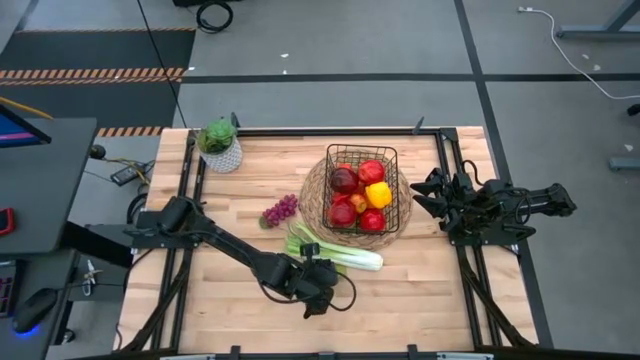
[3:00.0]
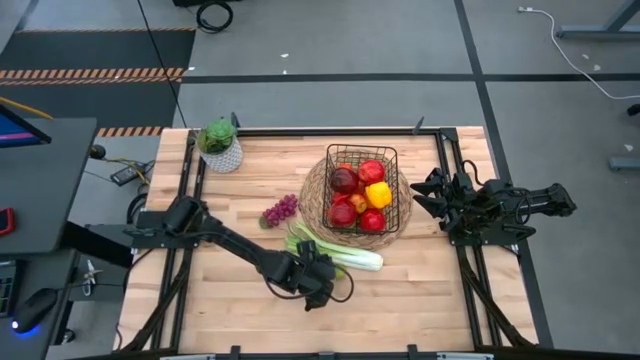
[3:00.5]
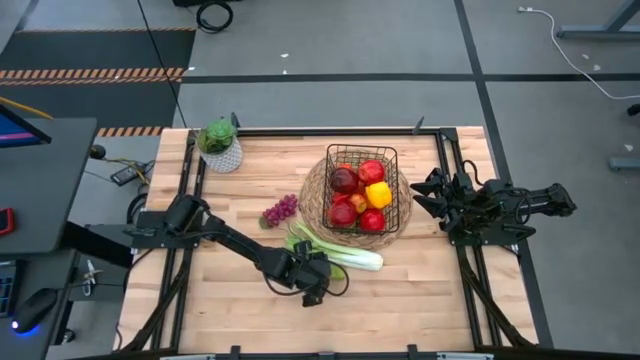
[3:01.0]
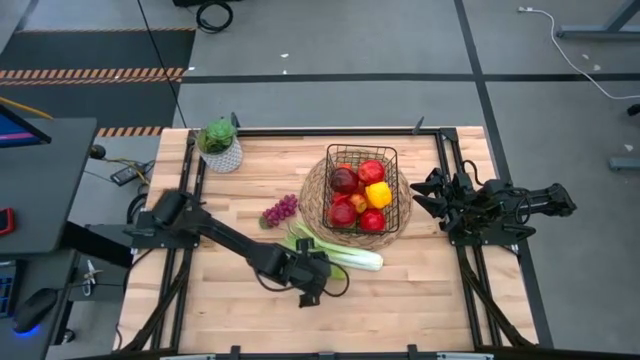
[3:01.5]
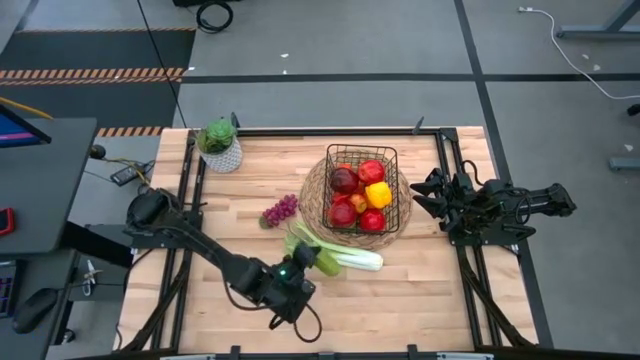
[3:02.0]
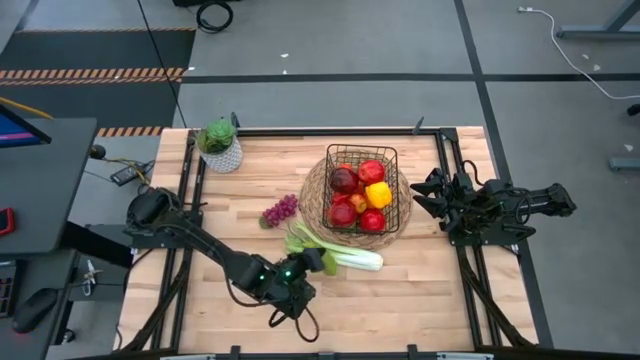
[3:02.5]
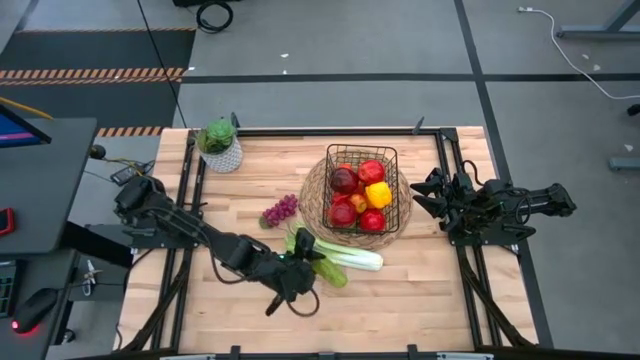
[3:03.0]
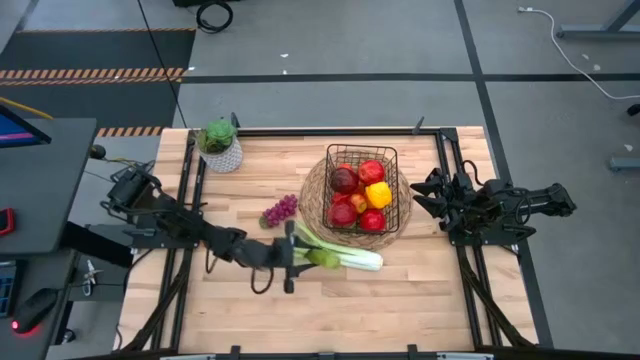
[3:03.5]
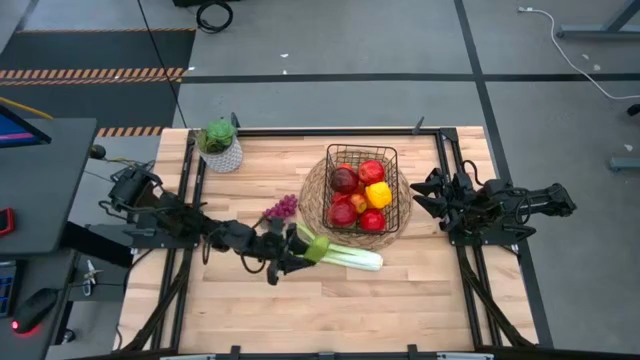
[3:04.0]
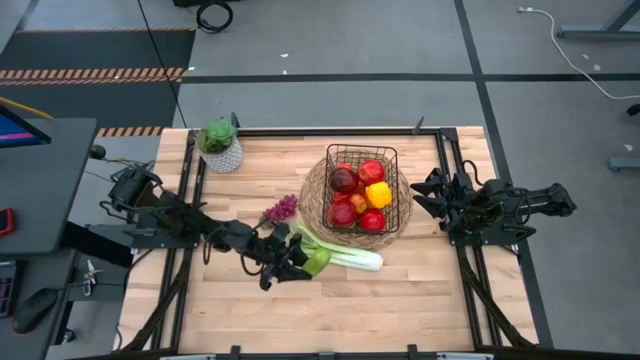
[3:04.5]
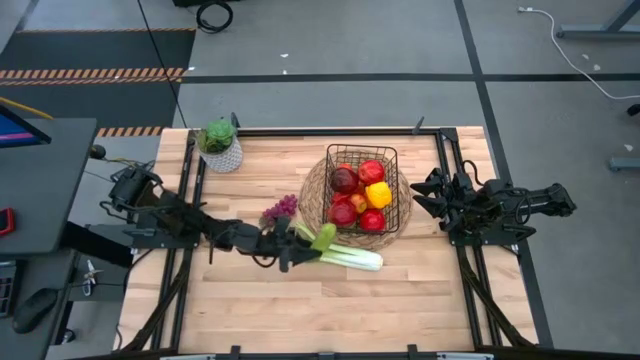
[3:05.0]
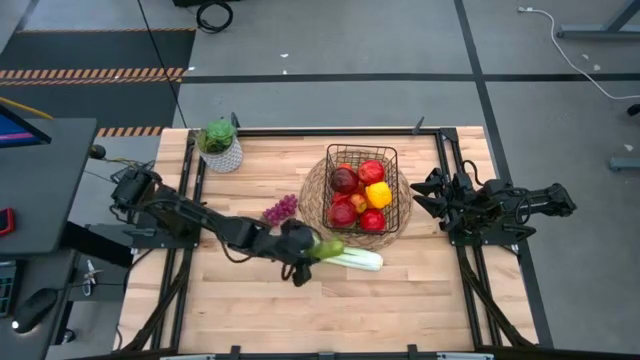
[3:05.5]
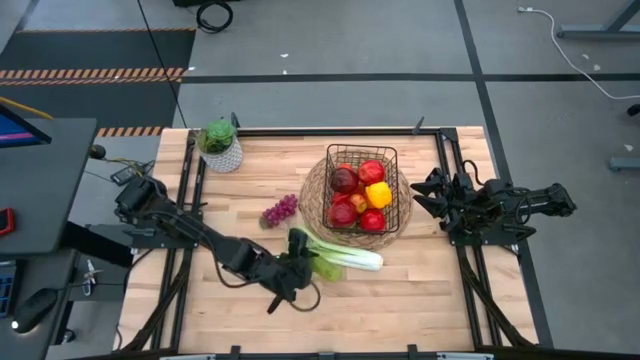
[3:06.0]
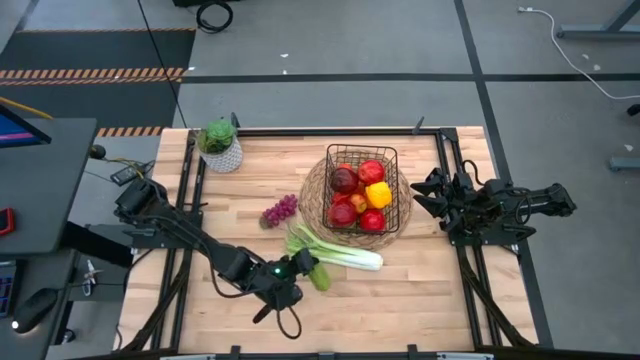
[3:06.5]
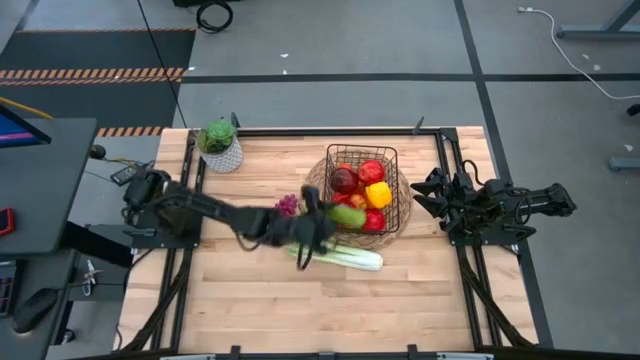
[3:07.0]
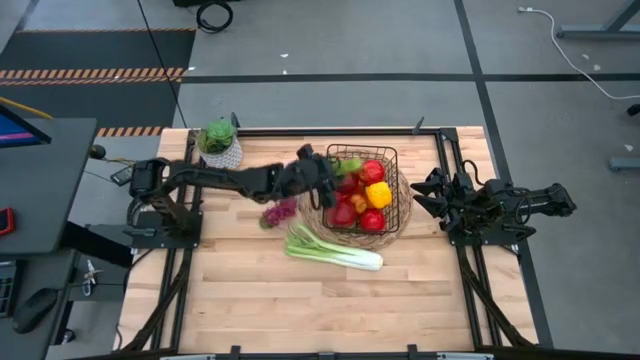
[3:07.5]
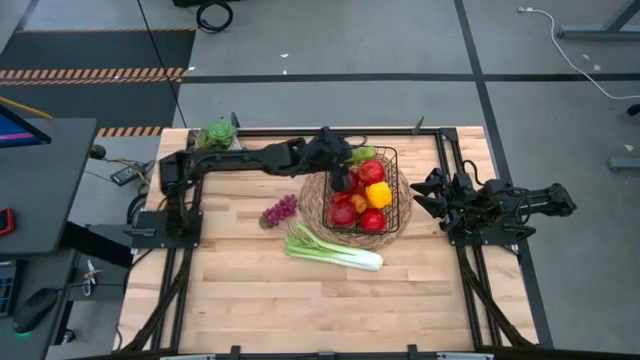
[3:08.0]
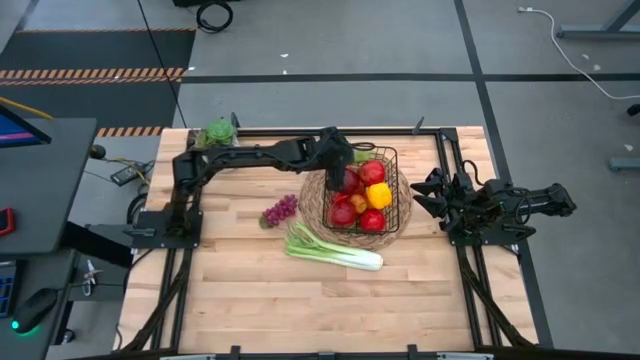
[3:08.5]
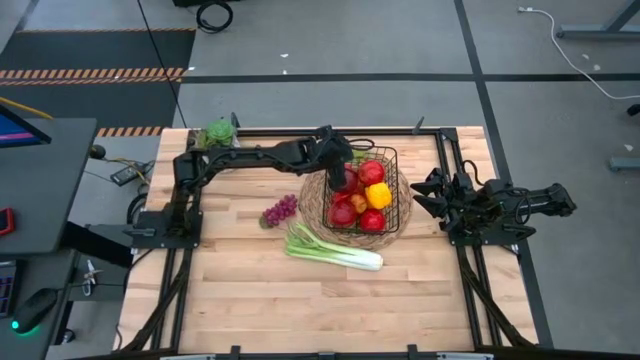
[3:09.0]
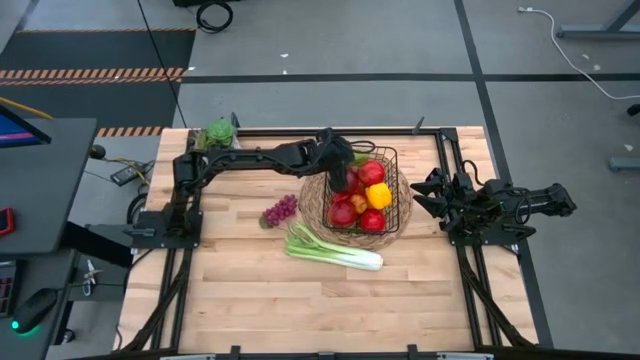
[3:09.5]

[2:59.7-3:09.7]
Task: Build produce basket
Put the cucumber into the wire basket

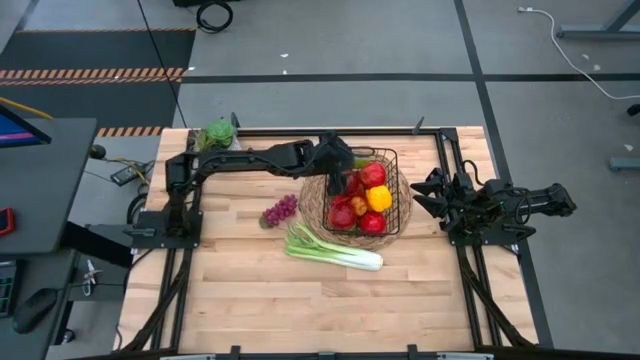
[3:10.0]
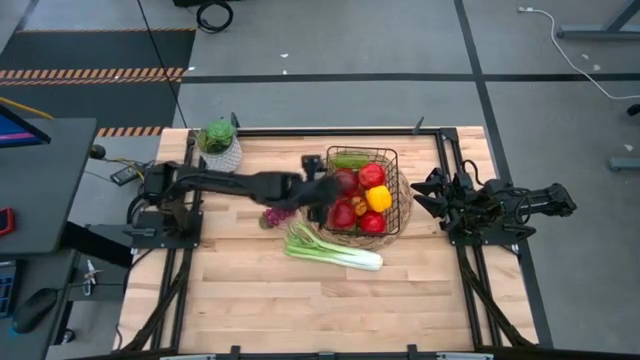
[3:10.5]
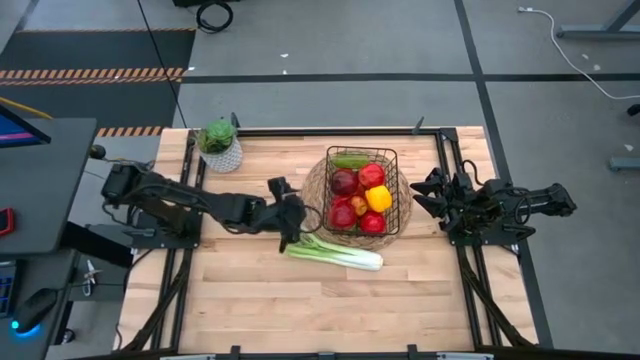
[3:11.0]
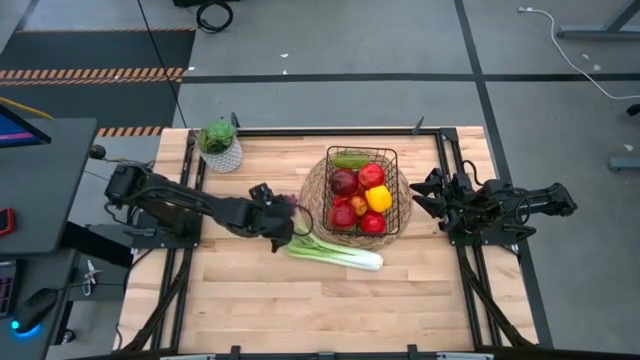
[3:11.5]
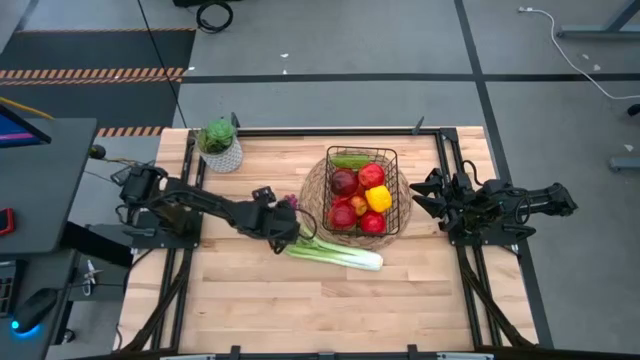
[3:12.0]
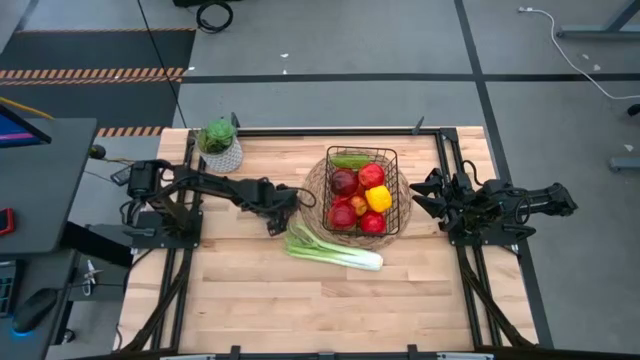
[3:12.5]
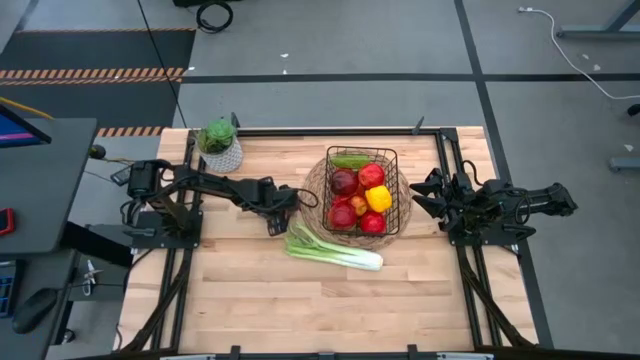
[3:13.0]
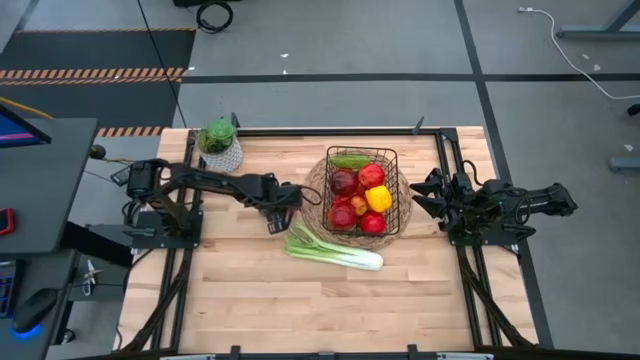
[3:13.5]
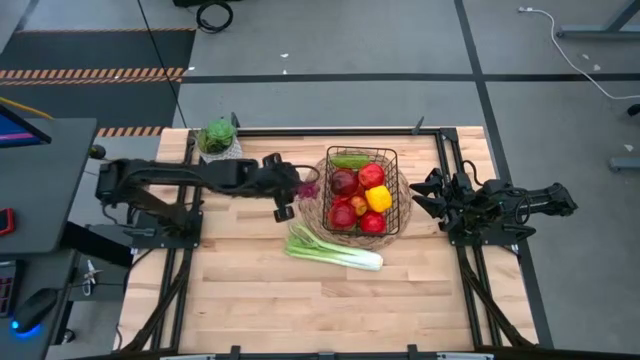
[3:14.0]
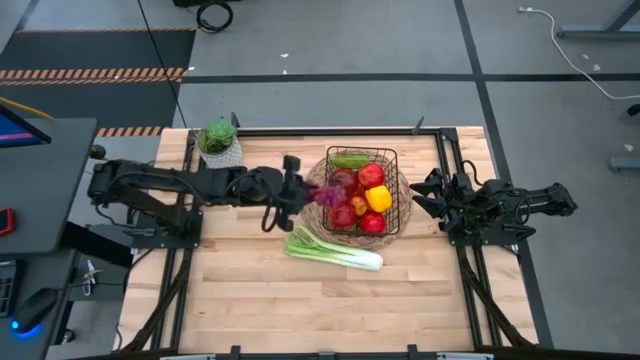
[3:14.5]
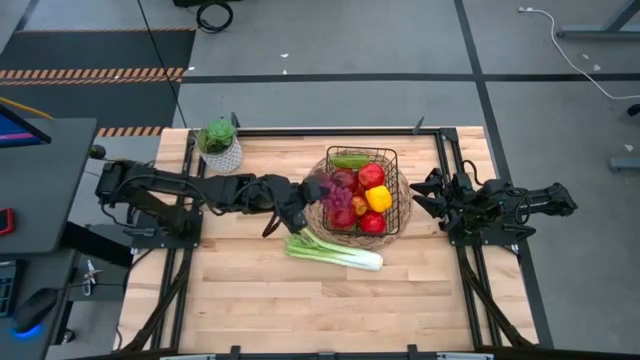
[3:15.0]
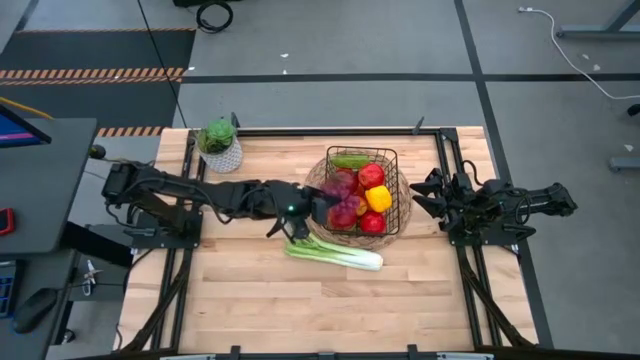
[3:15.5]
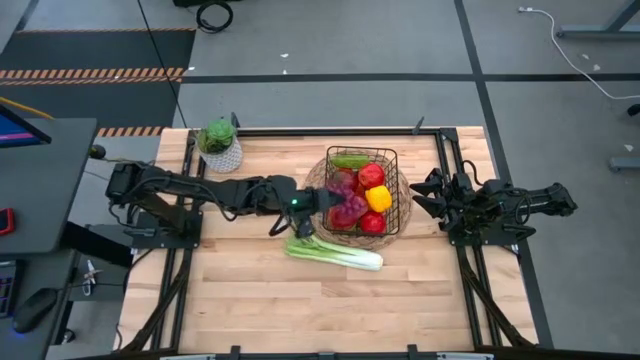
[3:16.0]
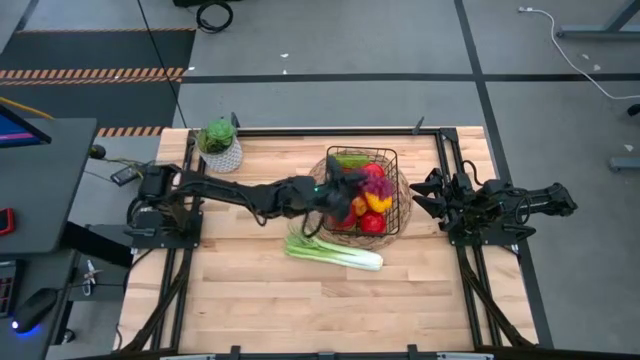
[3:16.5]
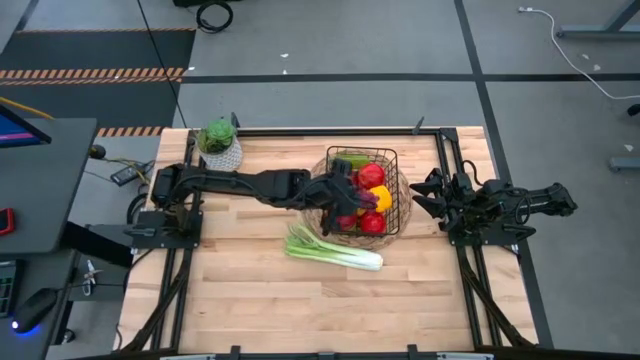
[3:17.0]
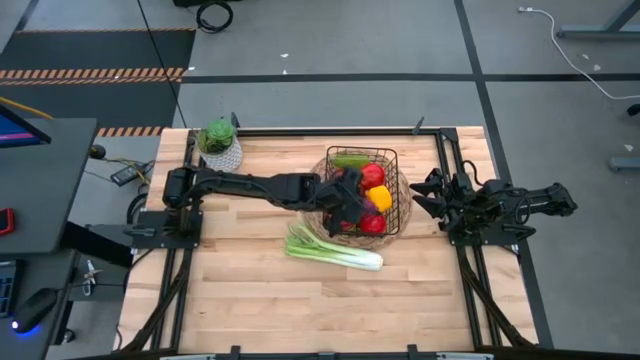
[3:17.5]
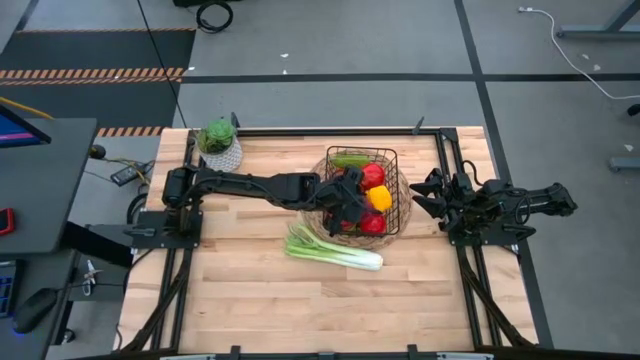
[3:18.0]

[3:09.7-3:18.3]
Put the grapes into the wire basket
